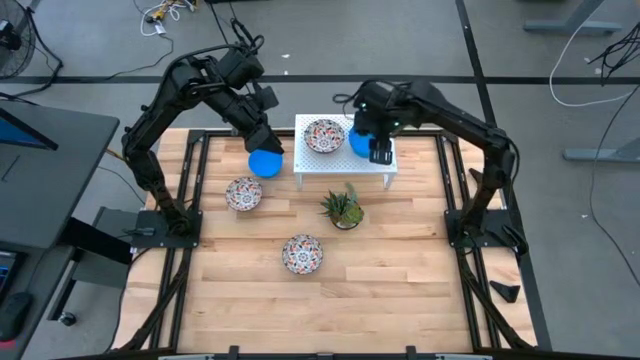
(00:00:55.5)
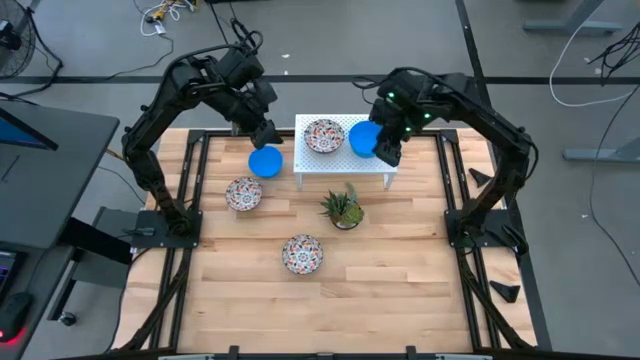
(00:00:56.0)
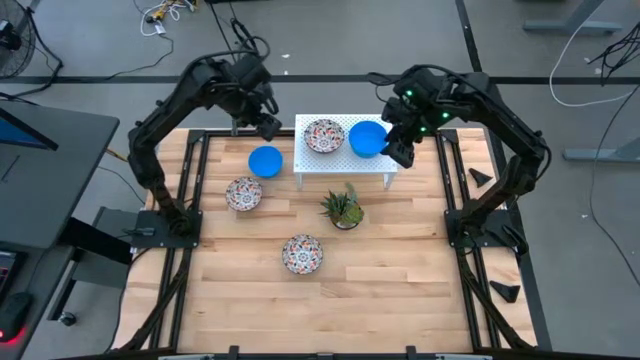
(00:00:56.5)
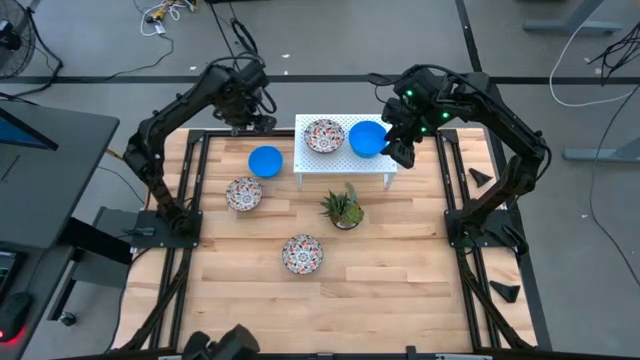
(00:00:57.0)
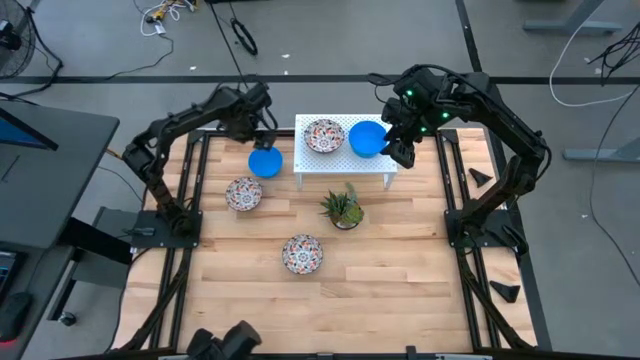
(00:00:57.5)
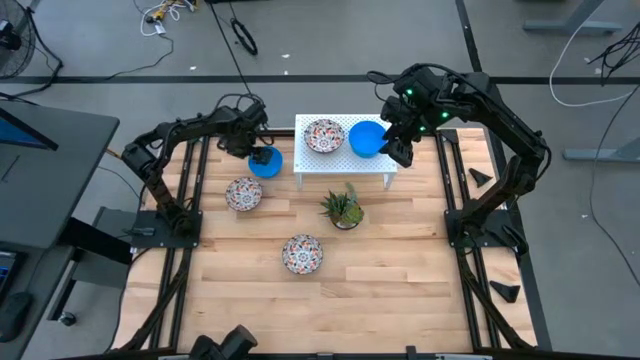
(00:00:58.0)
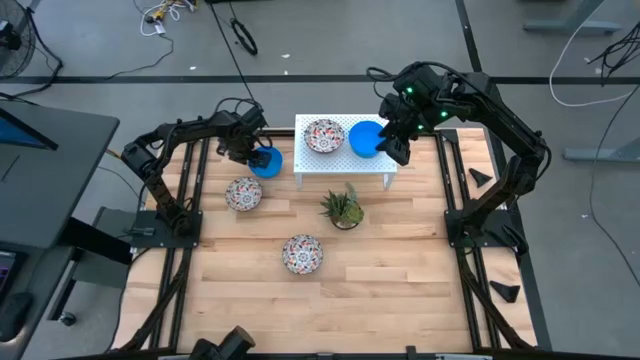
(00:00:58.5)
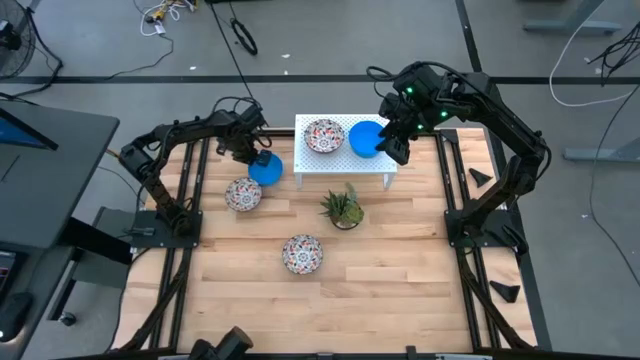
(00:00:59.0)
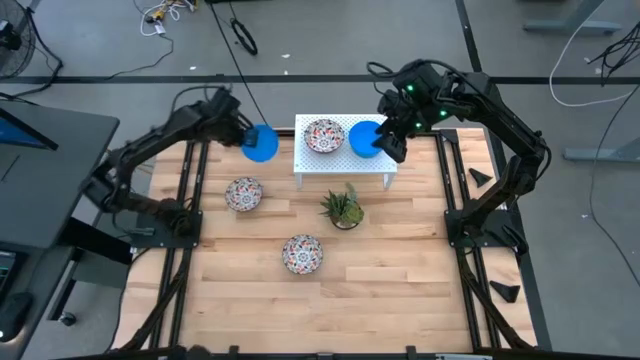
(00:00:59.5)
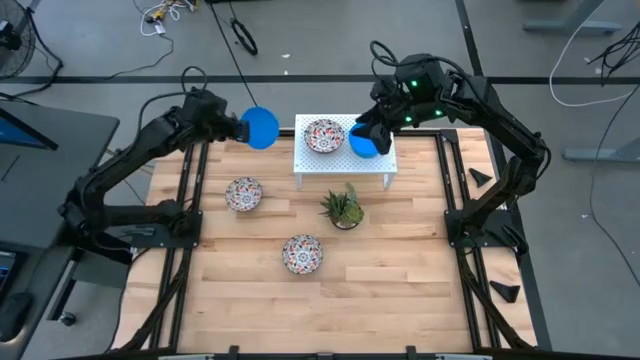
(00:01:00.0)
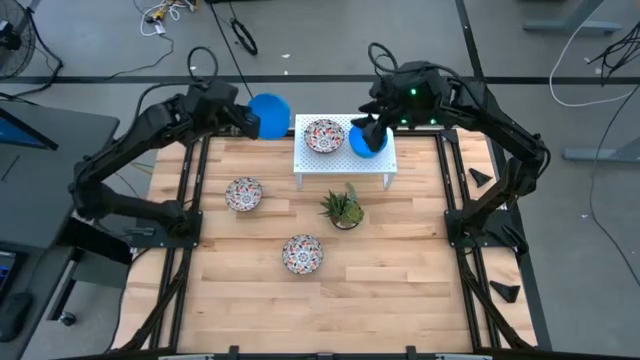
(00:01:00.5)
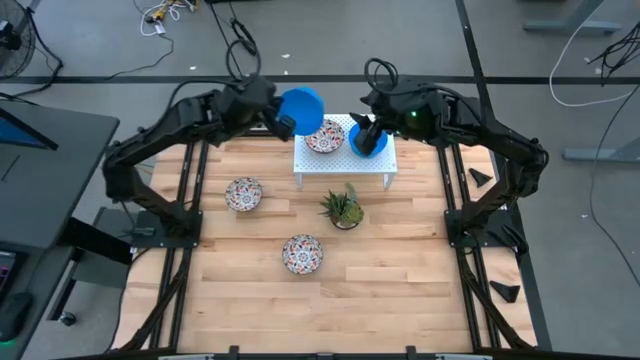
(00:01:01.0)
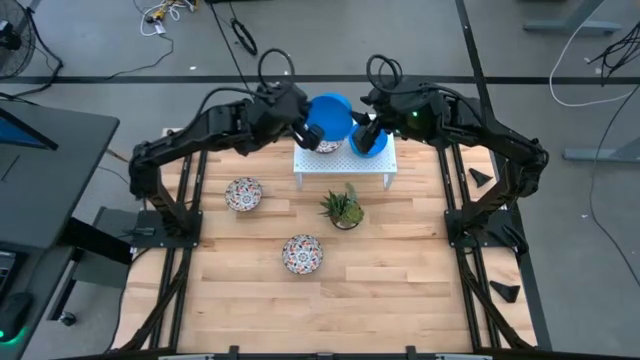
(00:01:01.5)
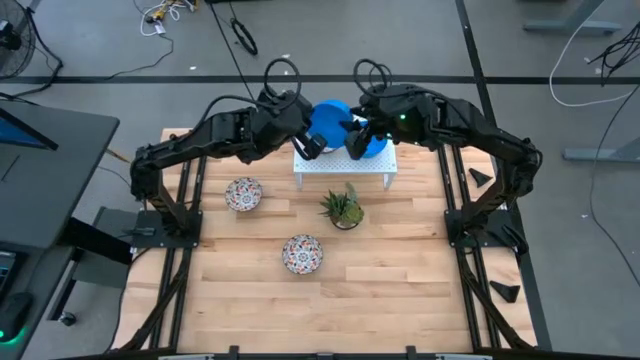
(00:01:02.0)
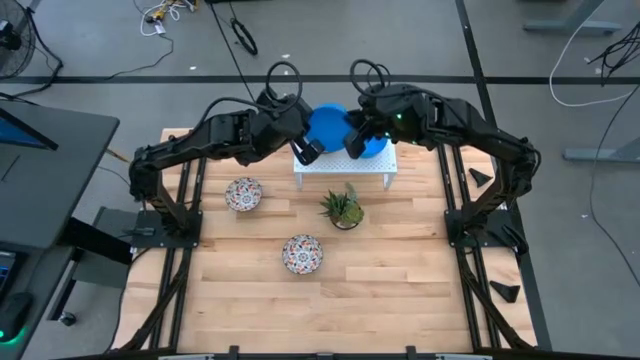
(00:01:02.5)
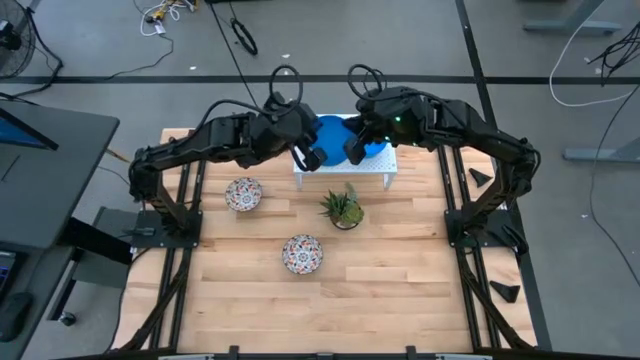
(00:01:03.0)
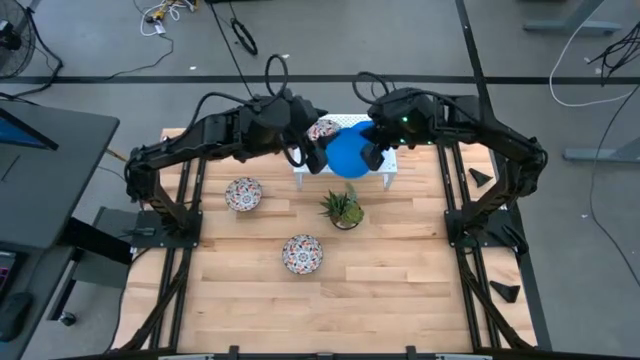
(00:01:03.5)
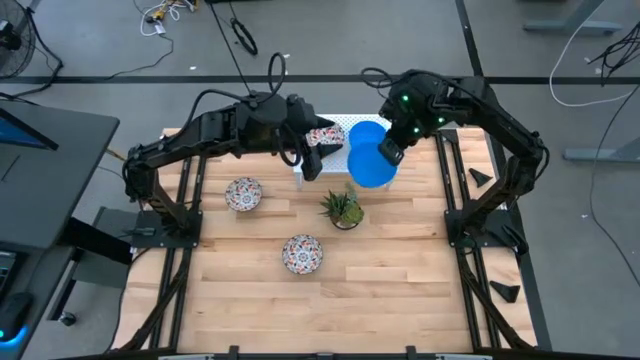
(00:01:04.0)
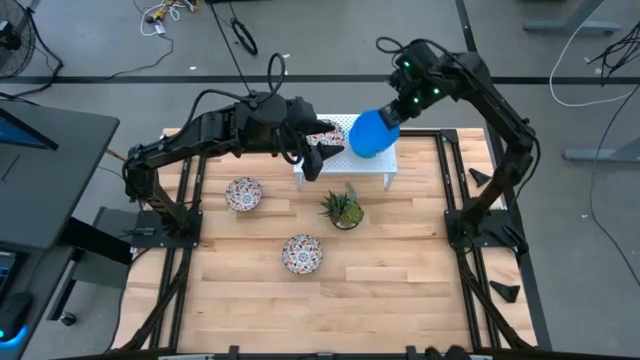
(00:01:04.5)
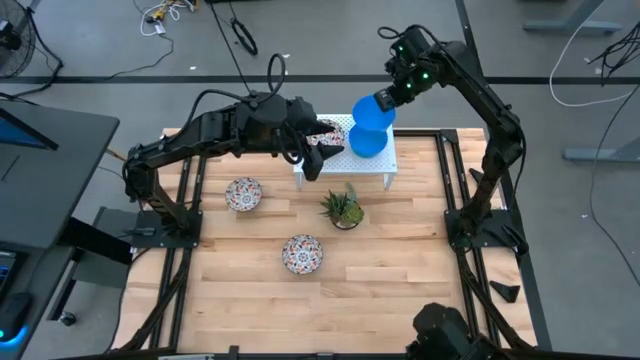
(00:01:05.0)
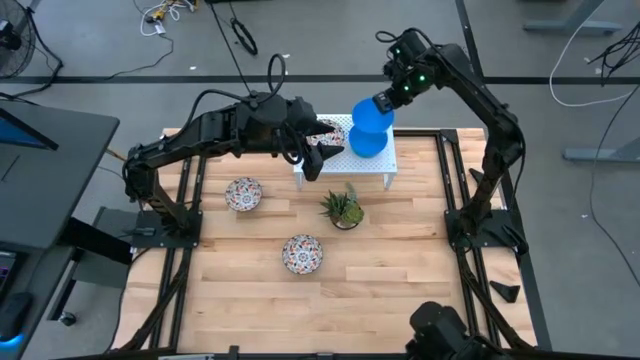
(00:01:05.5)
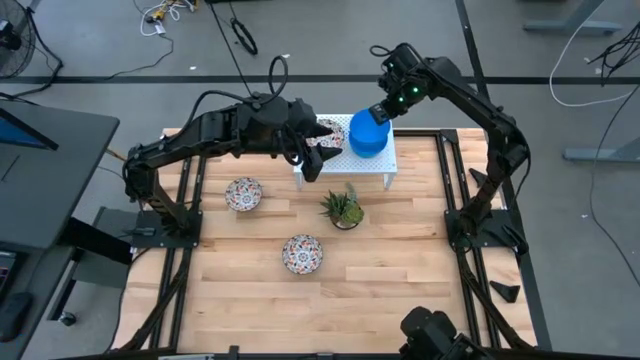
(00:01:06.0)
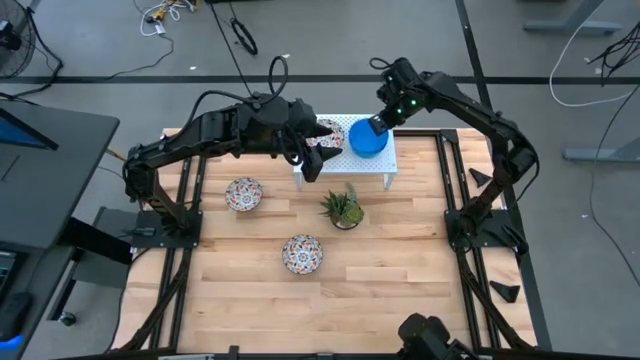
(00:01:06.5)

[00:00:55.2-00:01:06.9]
Task: Pick & Place Mini bowls
Stack the blue bowl on the blue bowl on the shelf

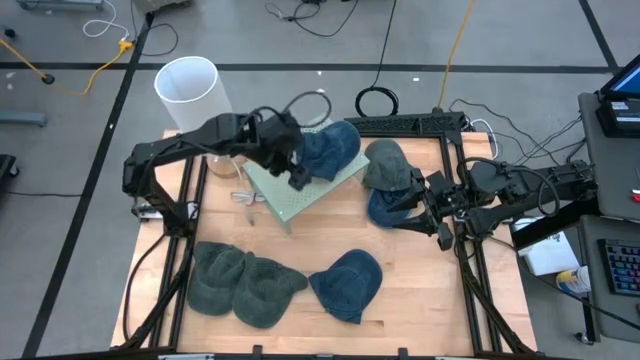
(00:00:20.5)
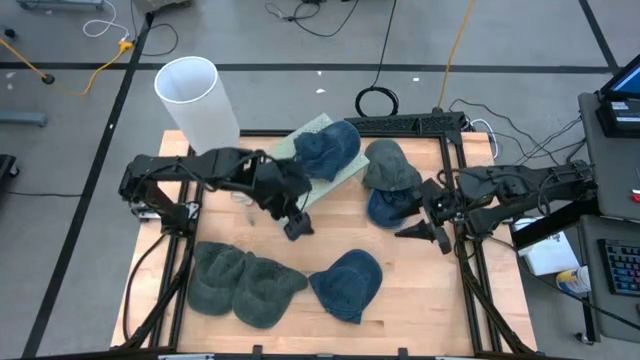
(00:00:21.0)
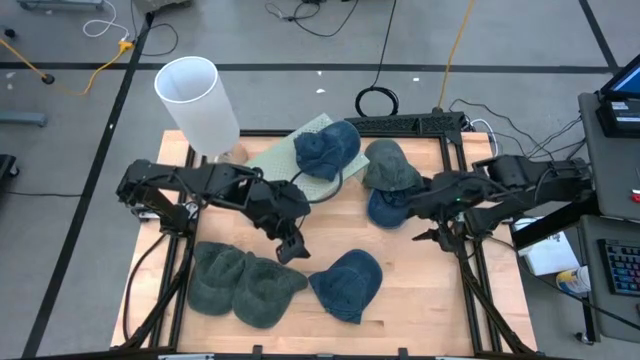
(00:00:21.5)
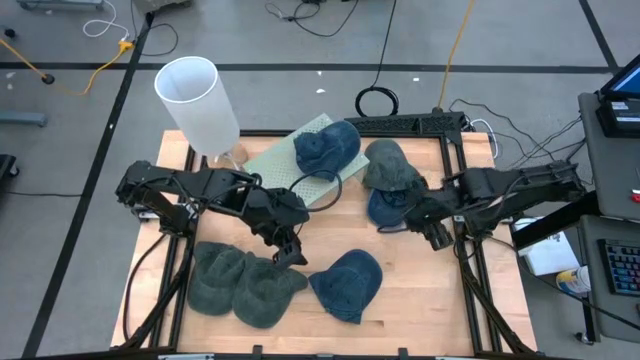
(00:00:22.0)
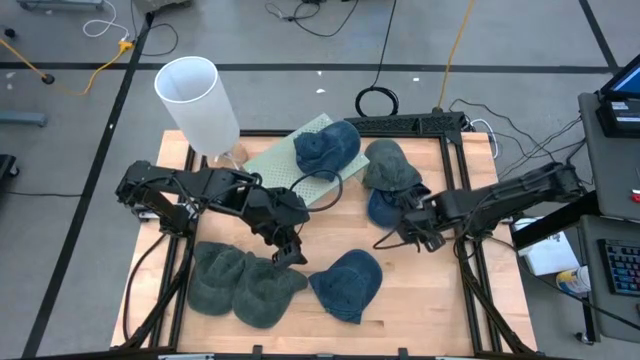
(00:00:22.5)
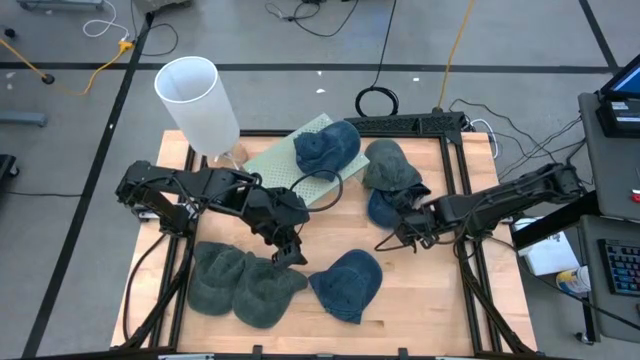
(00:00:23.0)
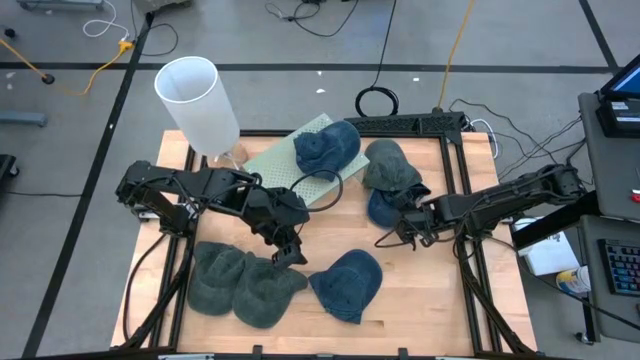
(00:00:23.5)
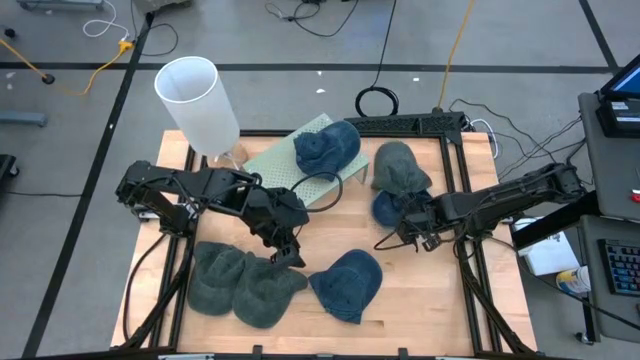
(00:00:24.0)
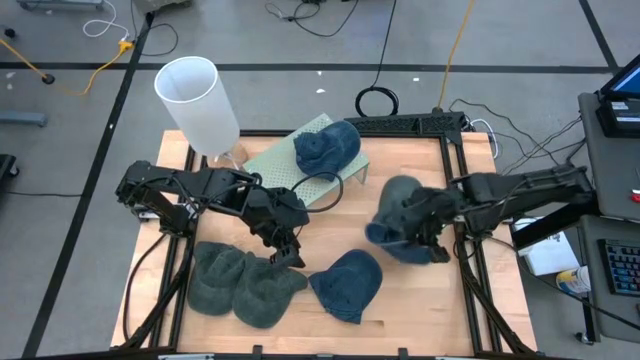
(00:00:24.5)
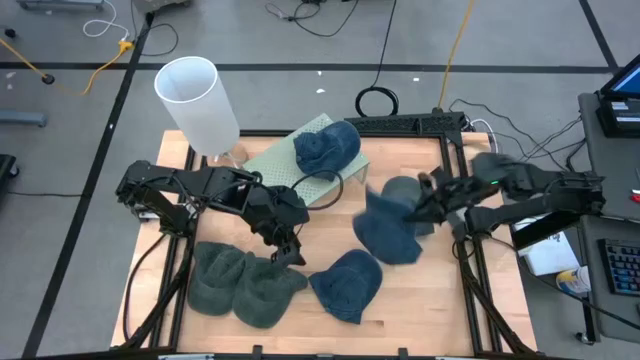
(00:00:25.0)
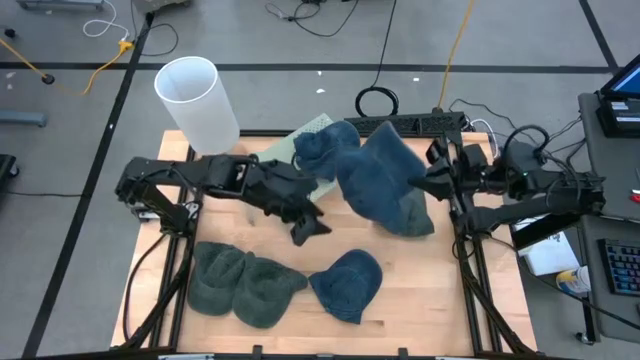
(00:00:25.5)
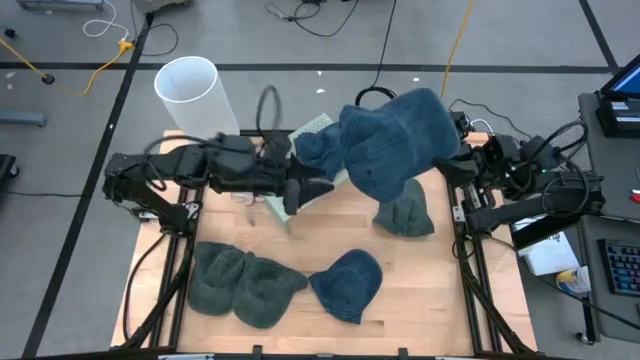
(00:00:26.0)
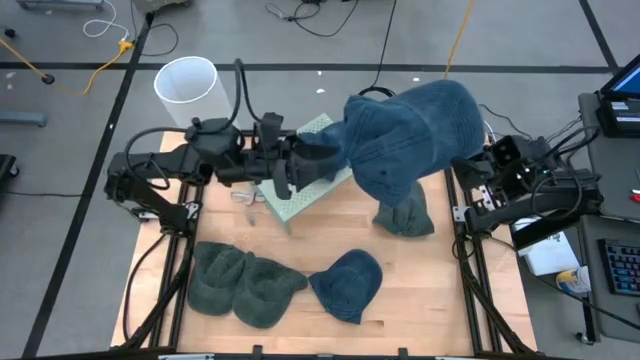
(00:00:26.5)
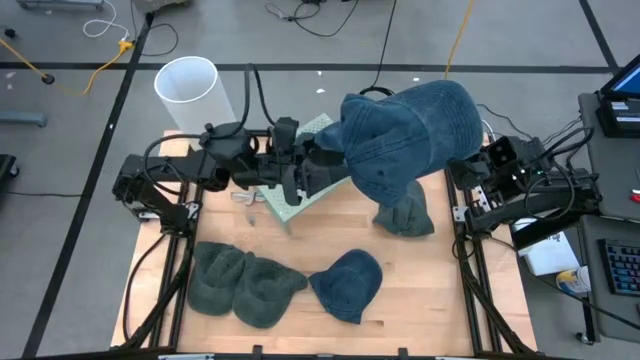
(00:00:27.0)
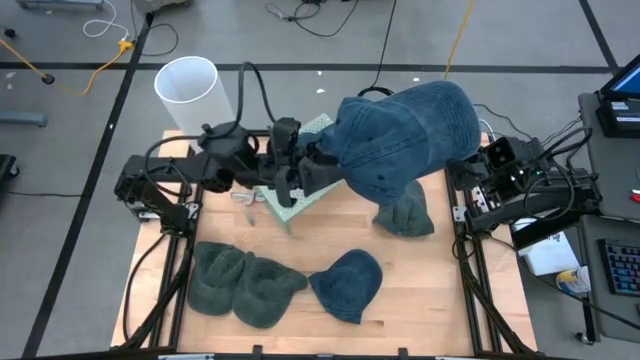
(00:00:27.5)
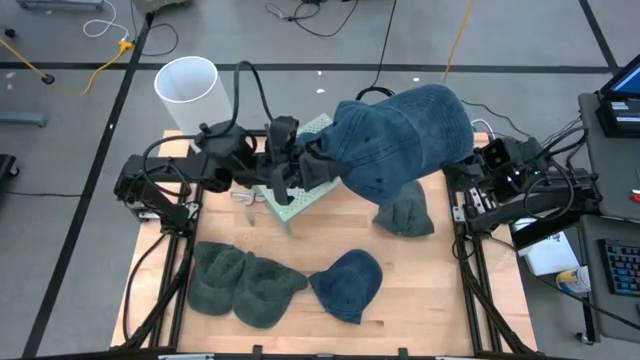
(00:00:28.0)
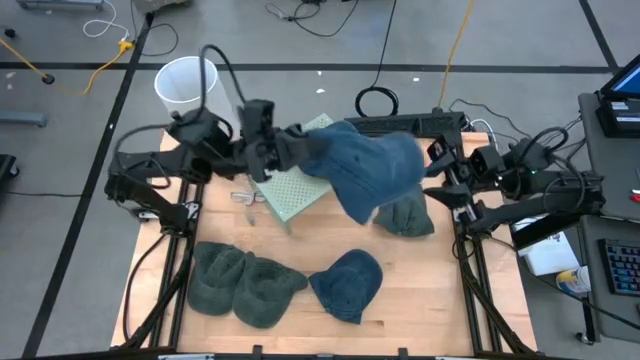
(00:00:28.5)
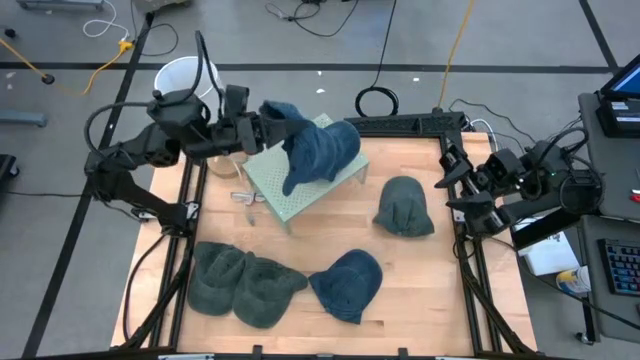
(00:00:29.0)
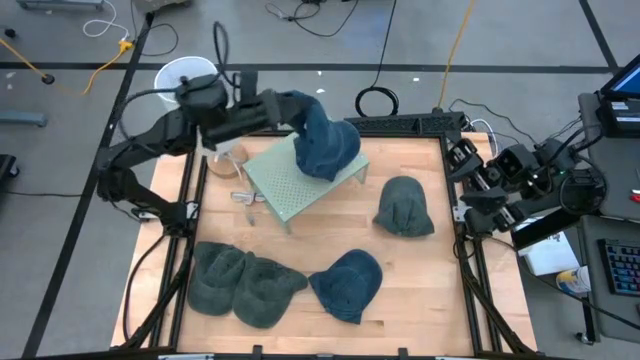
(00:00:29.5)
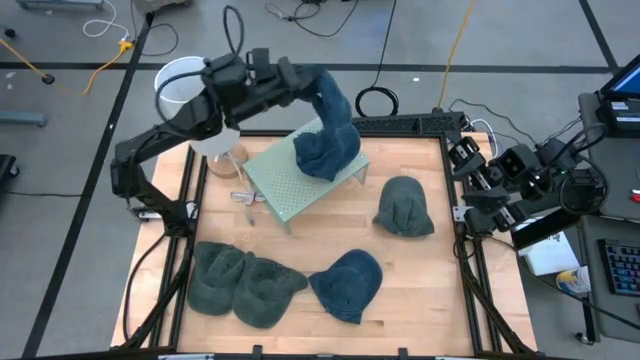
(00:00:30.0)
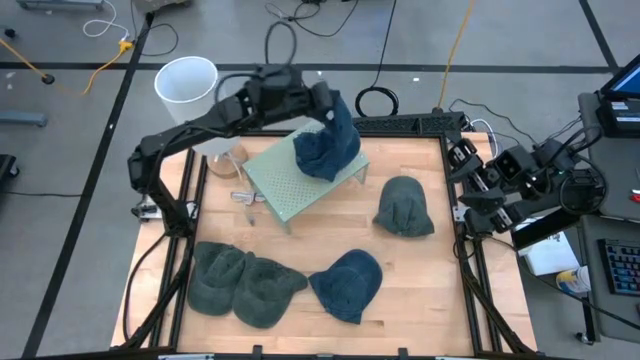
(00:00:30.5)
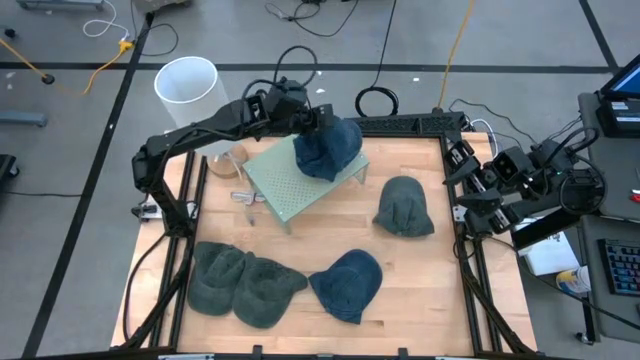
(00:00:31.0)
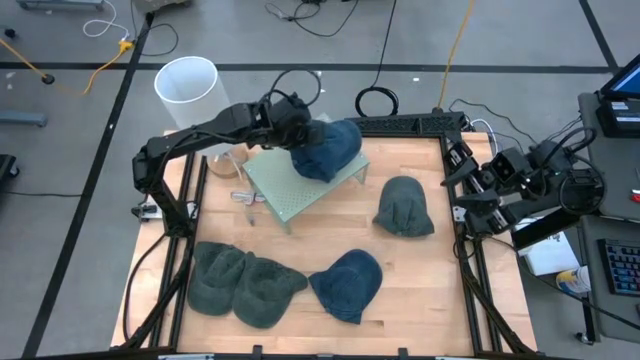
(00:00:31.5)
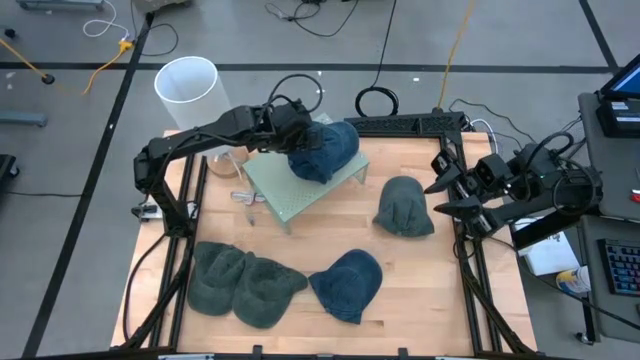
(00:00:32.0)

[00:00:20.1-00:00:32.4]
Task: Pick & Place hat
Stack the top blue cap on the other blue cap on the shelf
